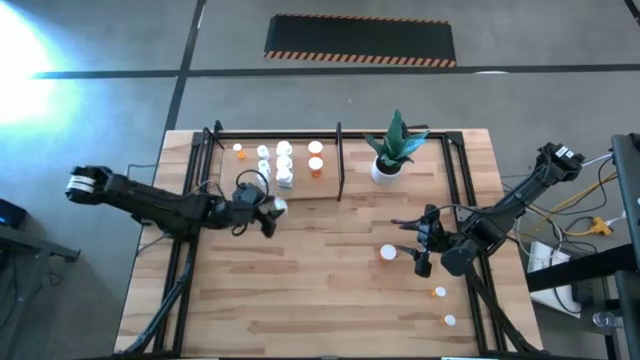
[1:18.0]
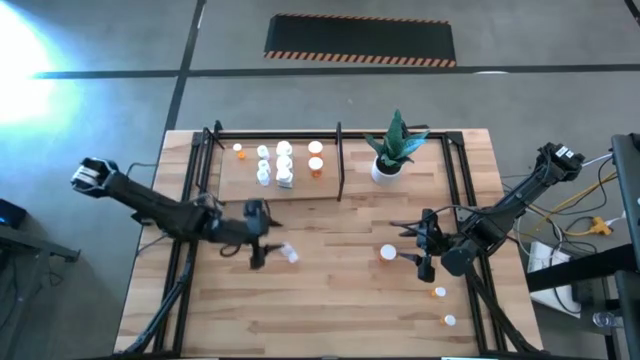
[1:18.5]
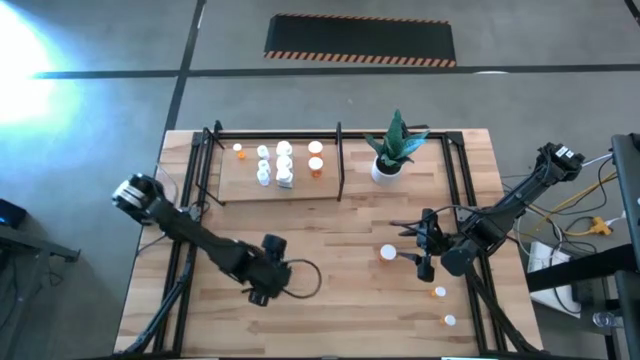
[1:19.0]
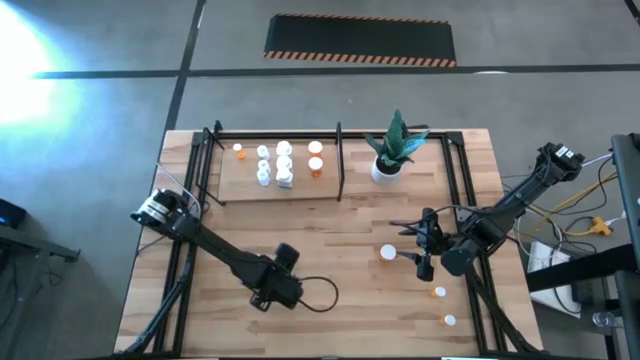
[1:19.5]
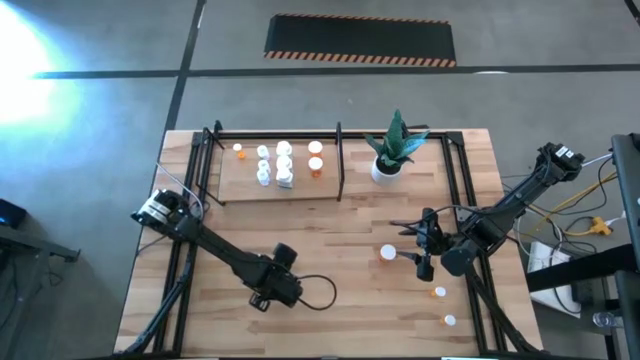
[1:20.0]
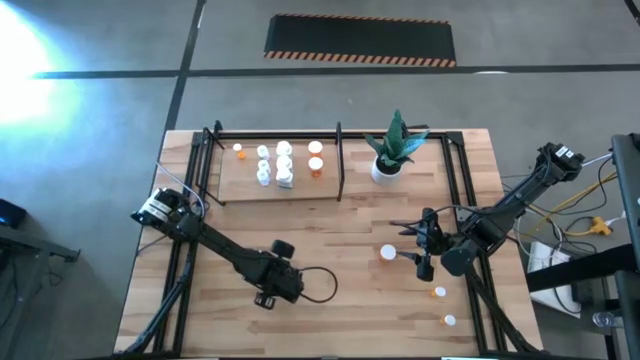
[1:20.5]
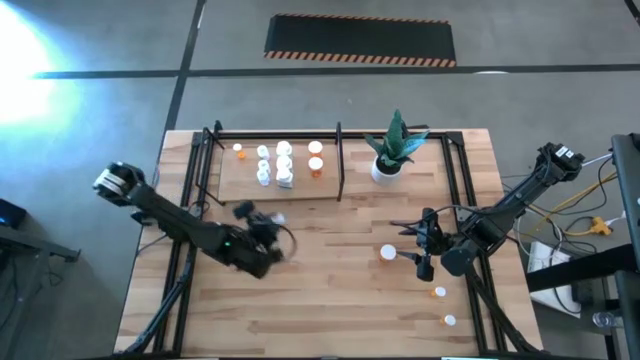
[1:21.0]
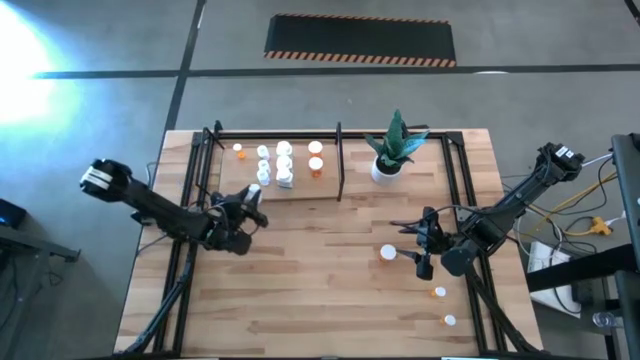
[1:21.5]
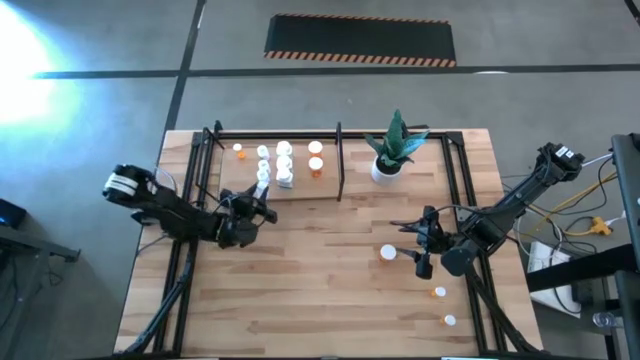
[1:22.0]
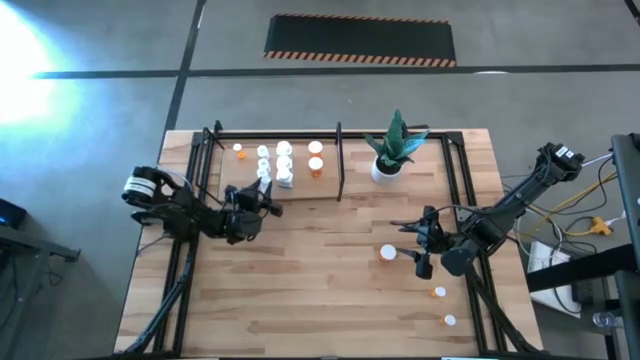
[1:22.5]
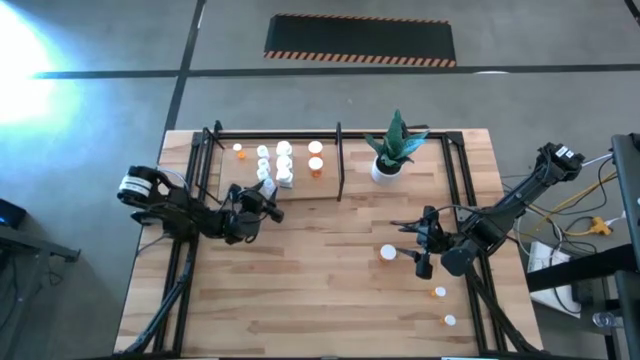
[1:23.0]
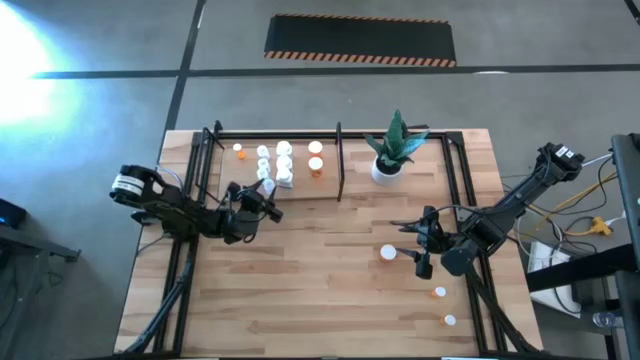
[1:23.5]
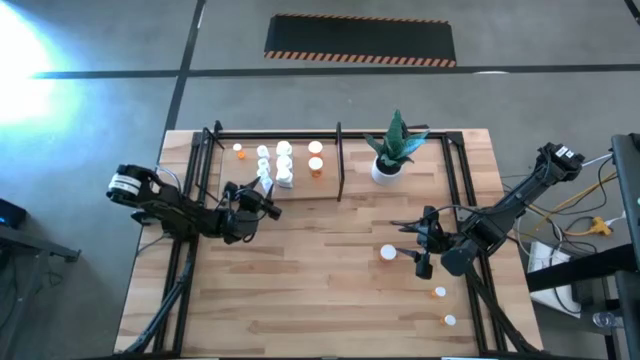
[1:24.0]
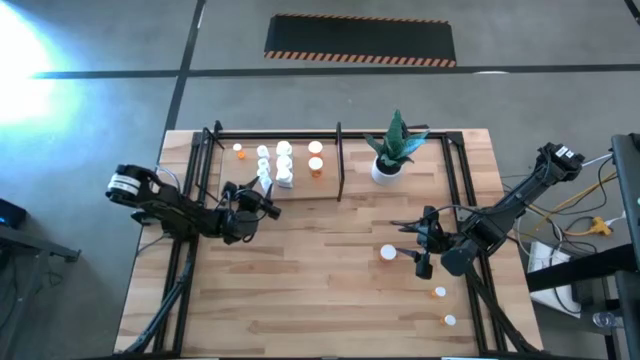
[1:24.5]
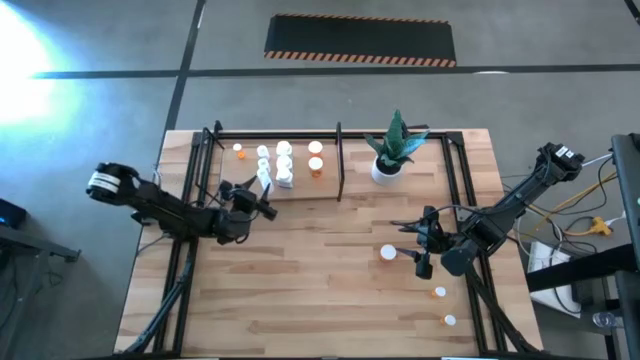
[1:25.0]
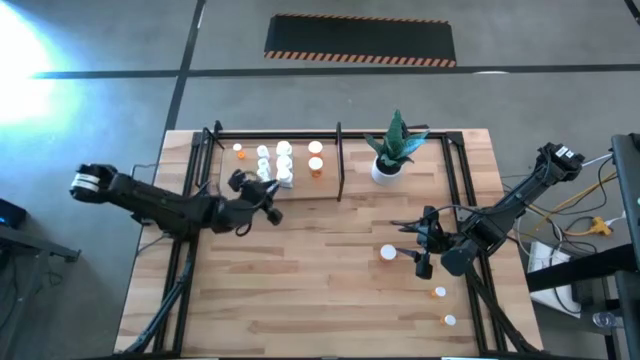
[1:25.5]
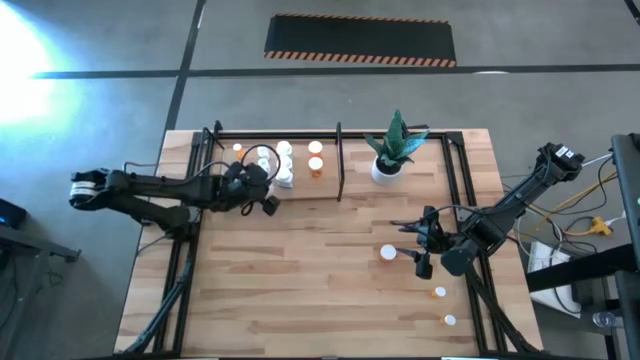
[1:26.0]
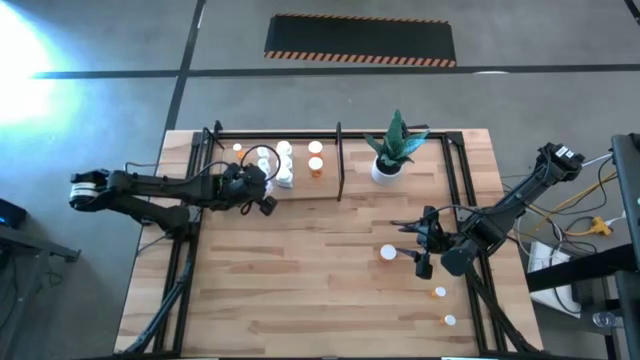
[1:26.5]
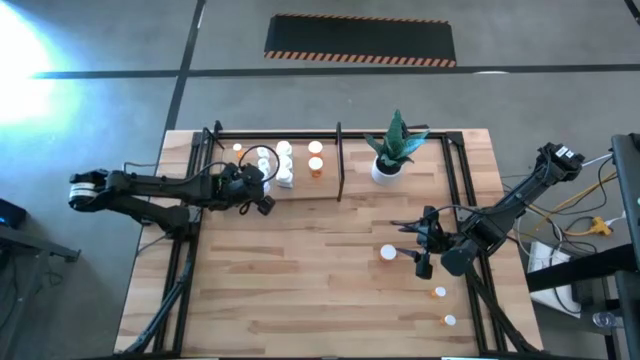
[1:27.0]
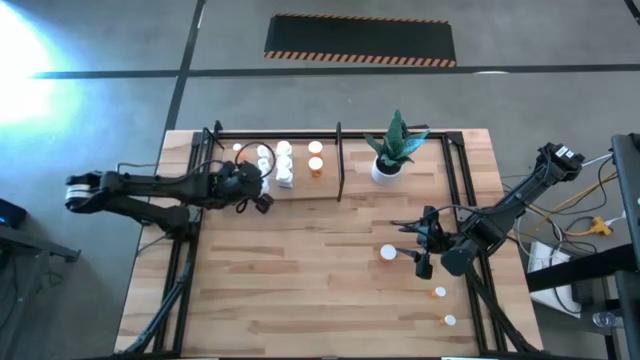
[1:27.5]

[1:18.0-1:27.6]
Task: Pick and place medicine bottles onto shelf by color
Put the transparent medicine container onto the shelf

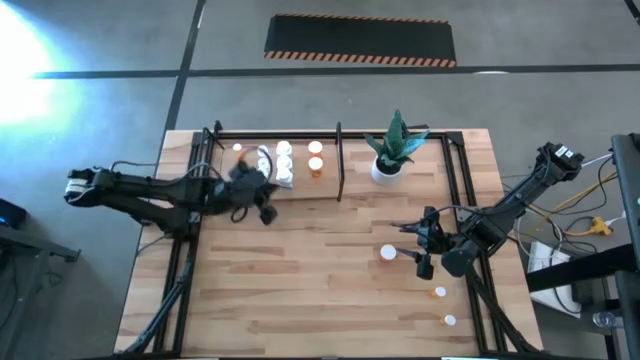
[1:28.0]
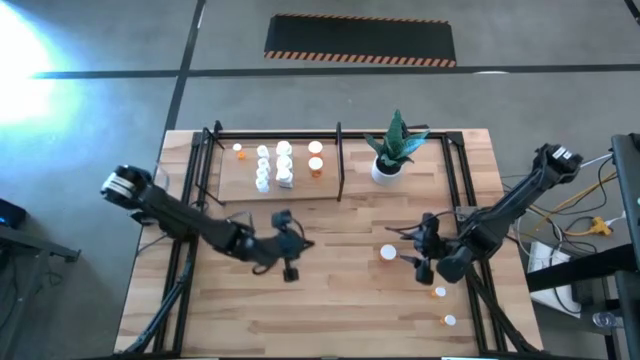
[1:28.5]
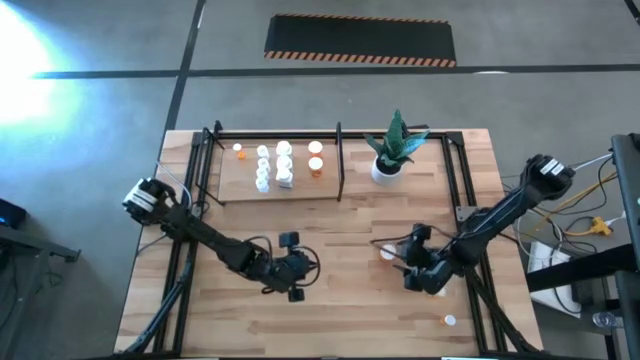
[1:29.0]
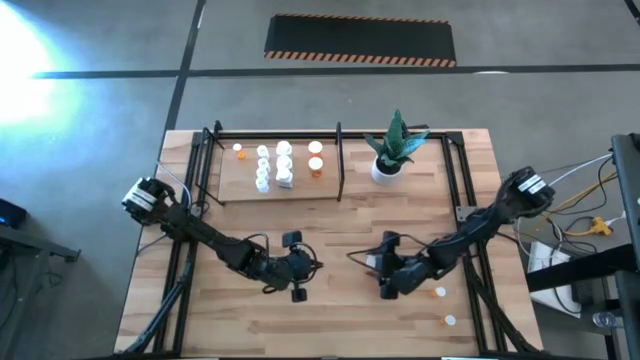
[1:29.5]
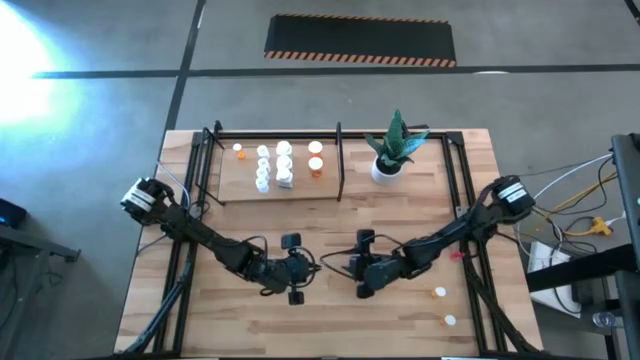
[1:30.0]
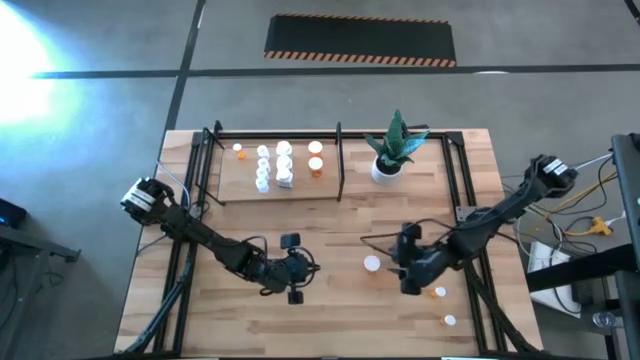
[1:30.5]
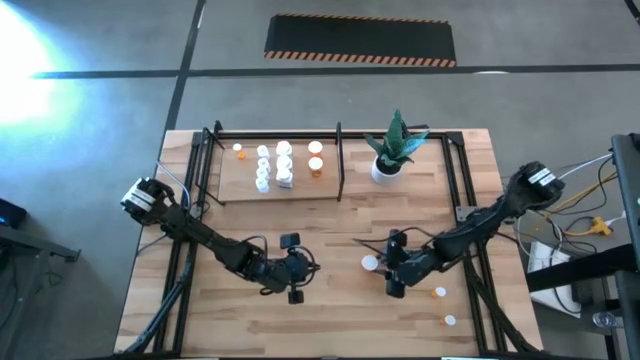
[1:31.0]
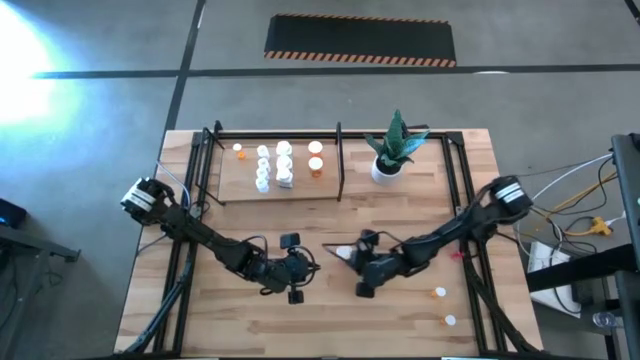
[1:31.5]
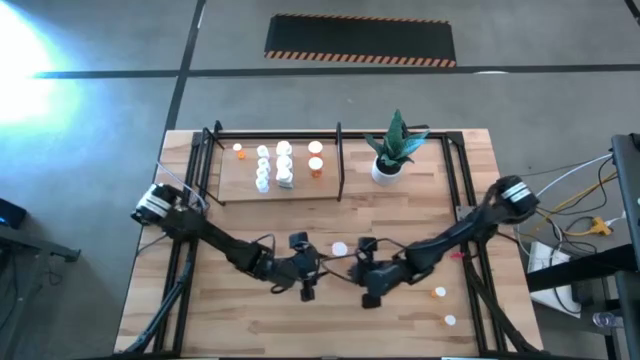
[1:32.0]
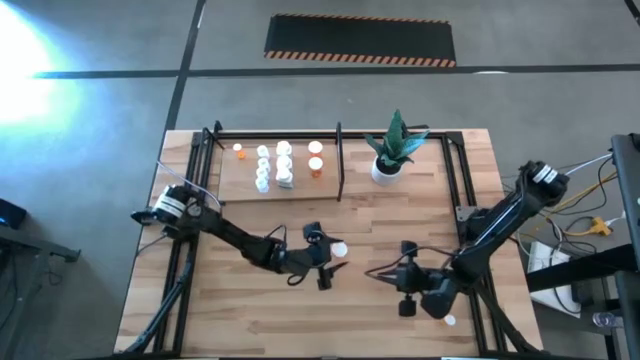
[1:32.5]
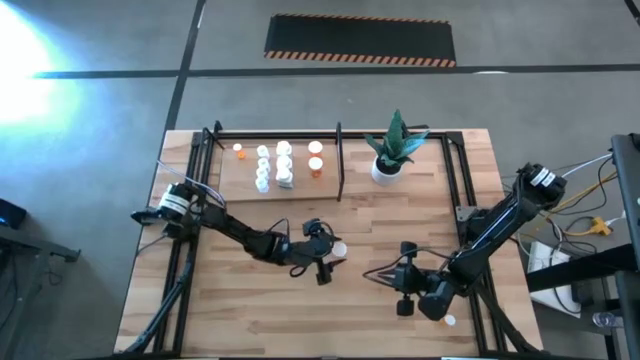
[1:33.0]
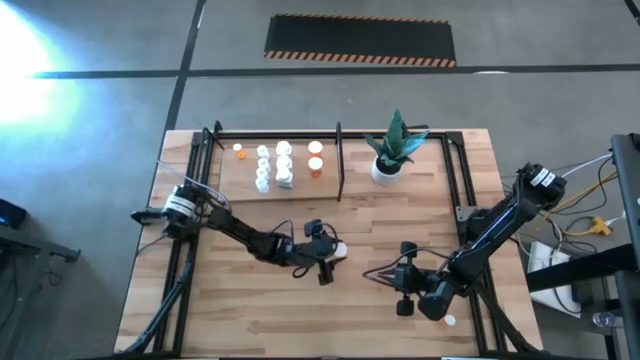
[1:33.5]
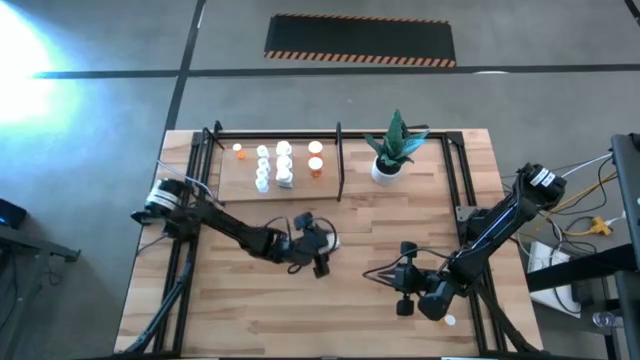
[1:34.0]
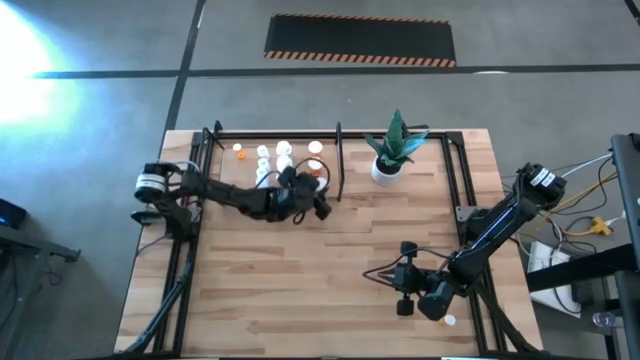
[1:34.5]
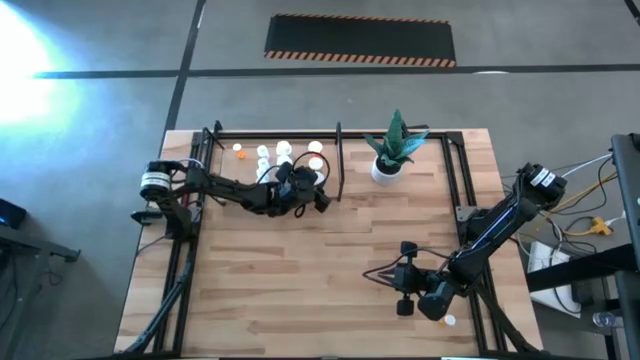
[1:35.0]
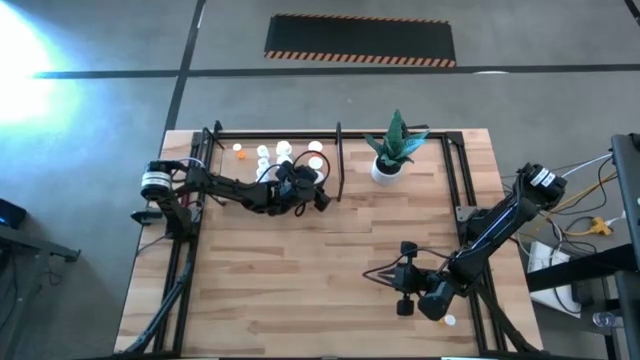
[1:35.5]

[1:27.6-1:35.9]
Put the small orange medicine container on the shelf

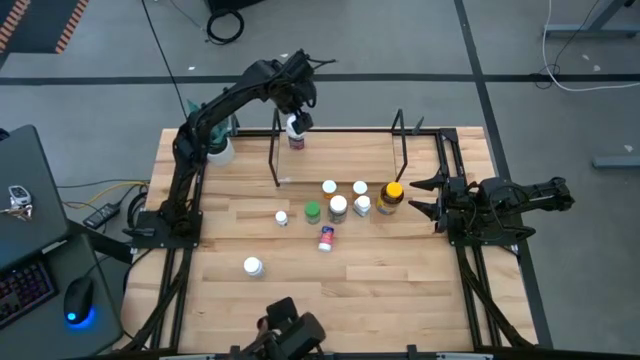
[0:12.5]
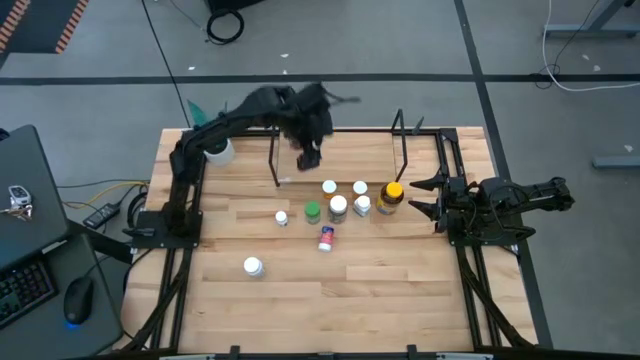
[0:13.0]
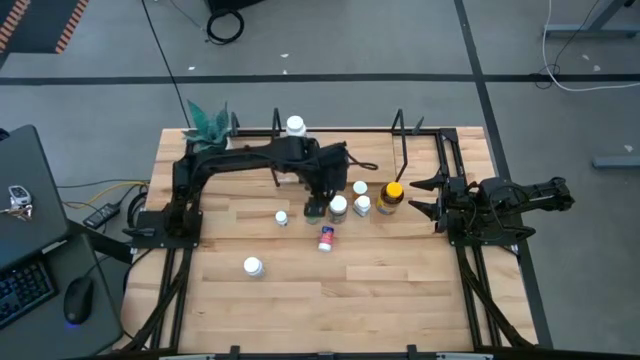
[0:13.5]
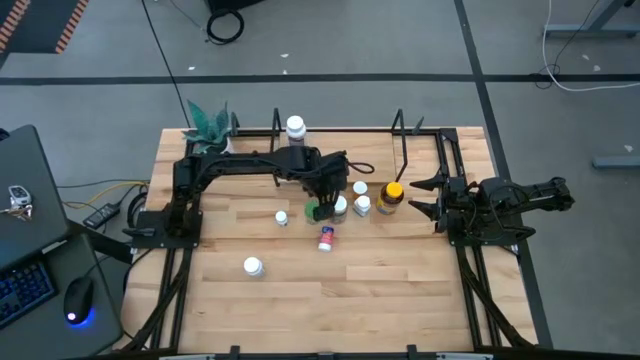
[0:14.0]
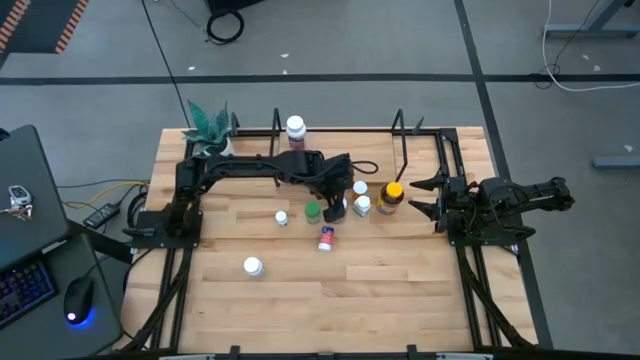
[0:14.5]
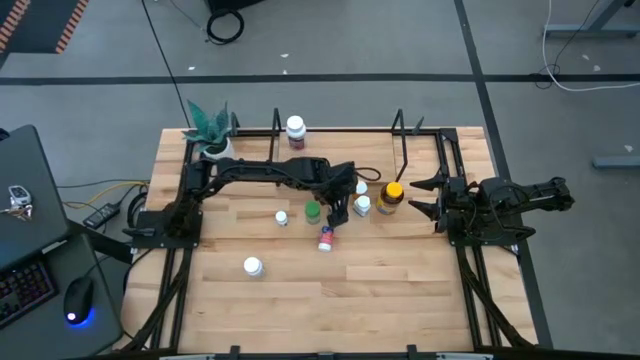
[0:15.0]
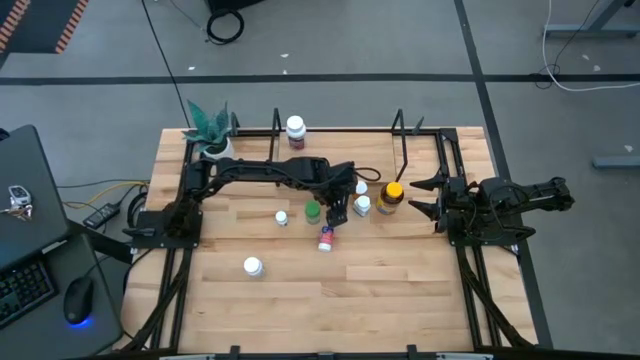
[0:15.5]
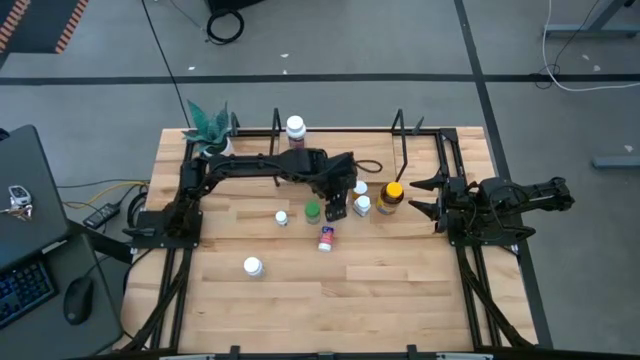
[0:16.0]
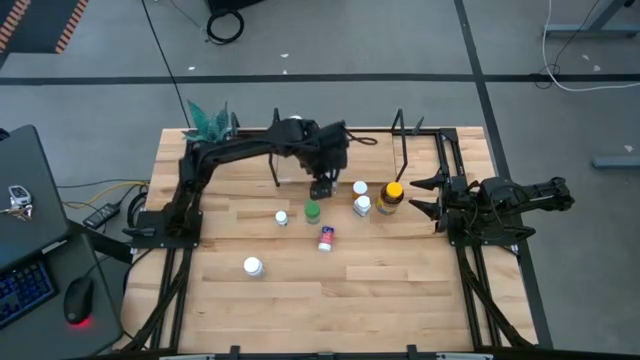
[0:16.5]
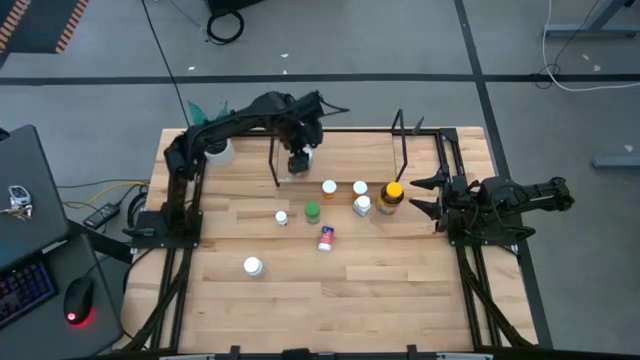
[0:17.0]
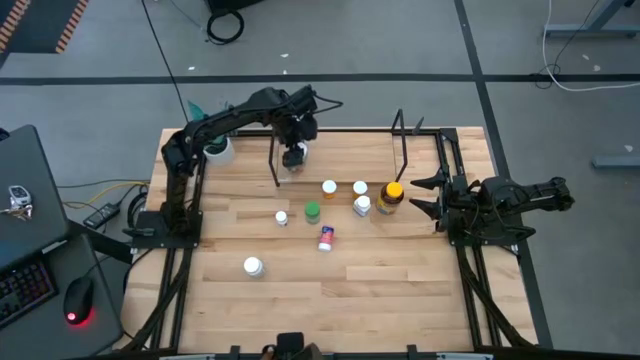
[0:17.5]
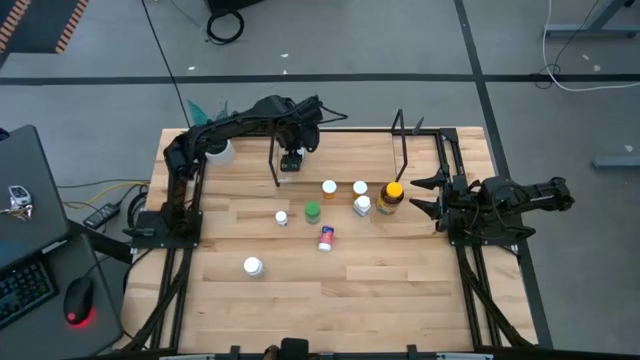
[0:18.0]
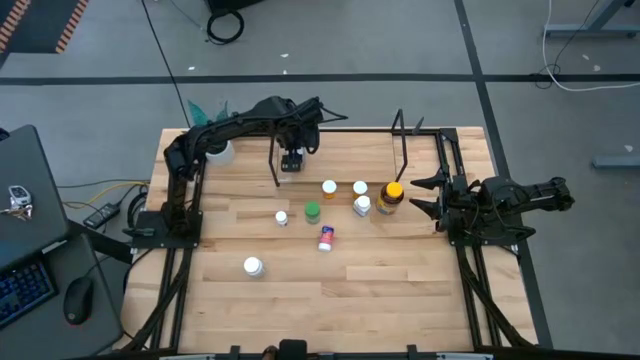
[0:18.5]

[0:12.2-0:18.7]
Task: Pick and place medicine bottles onto shelf by color
Put the green pill bottle on the shelf
